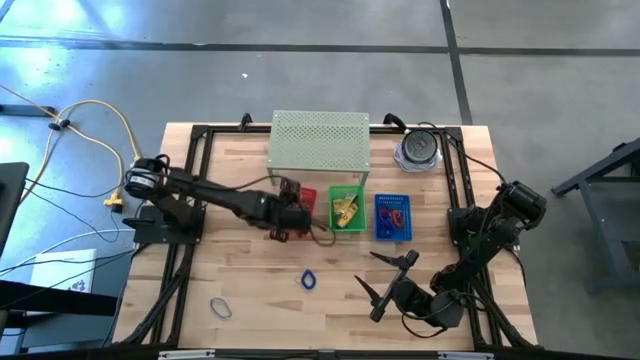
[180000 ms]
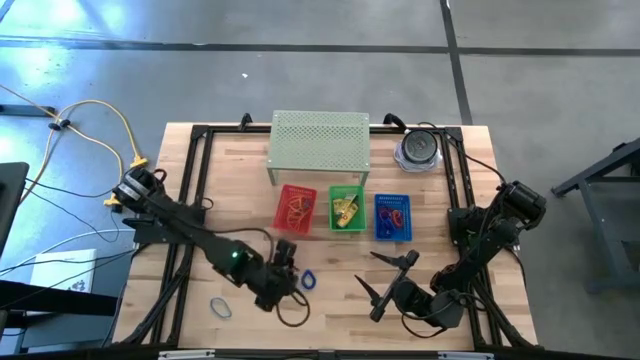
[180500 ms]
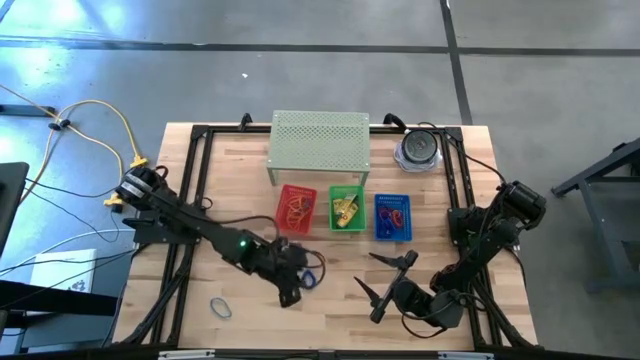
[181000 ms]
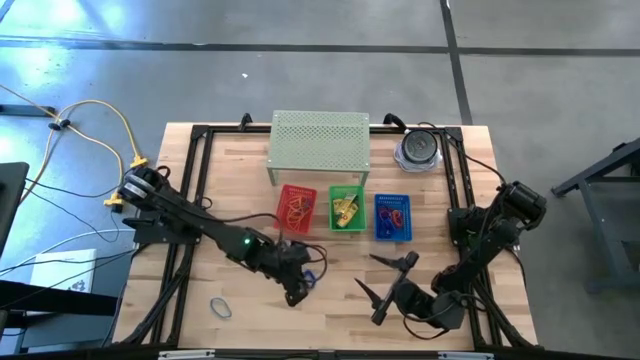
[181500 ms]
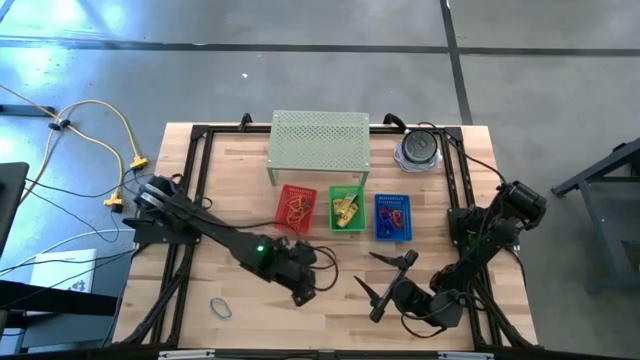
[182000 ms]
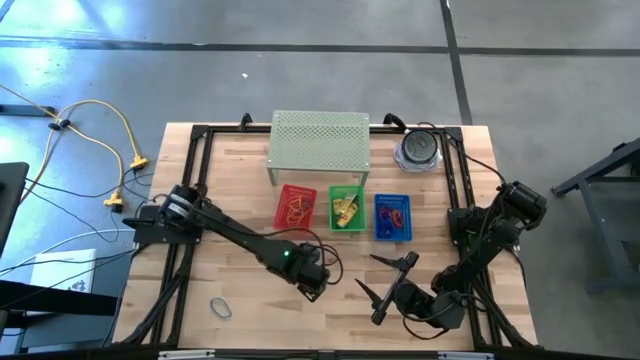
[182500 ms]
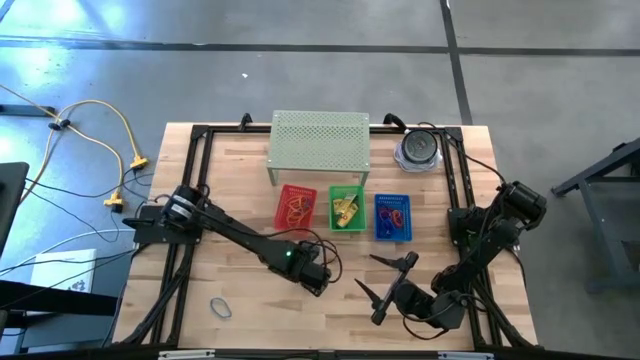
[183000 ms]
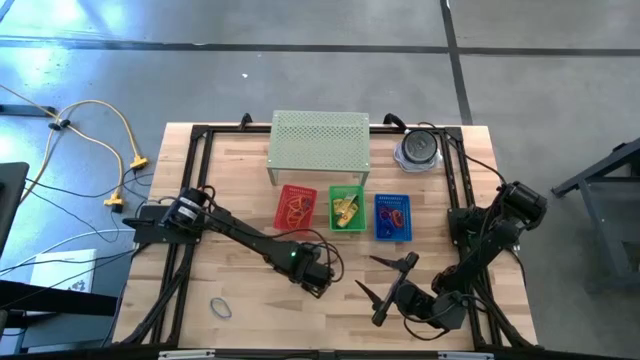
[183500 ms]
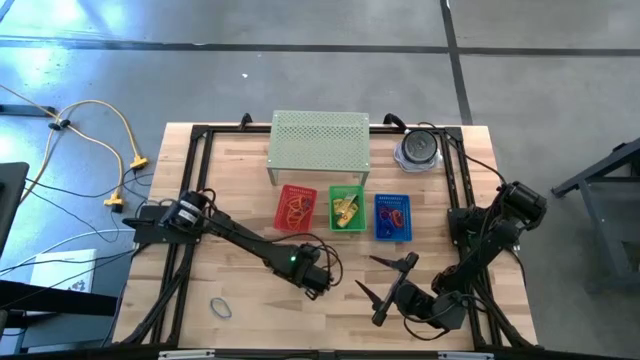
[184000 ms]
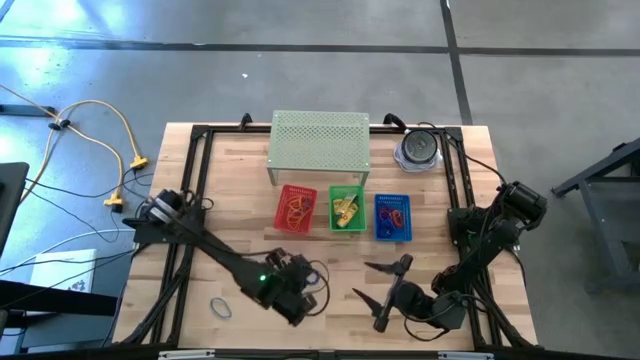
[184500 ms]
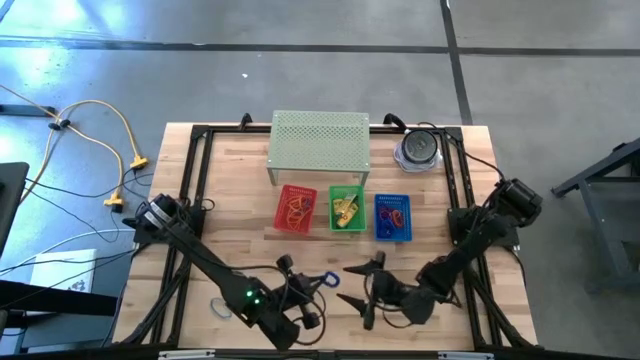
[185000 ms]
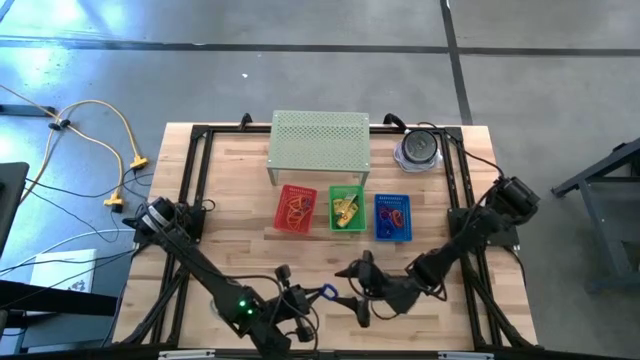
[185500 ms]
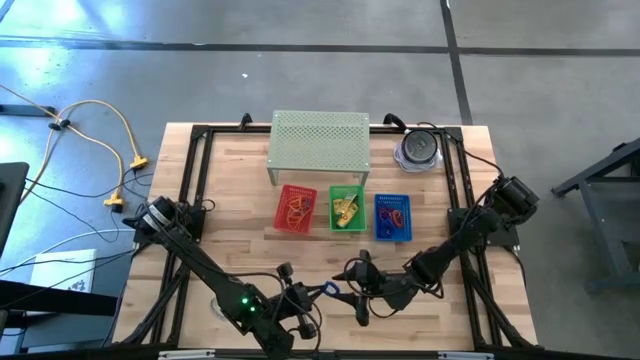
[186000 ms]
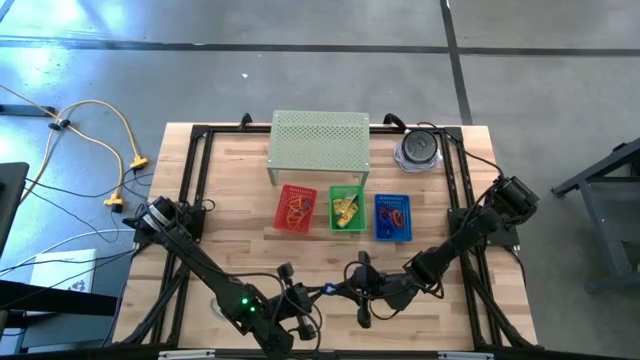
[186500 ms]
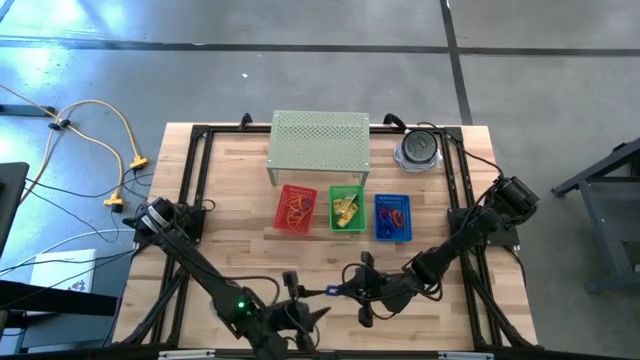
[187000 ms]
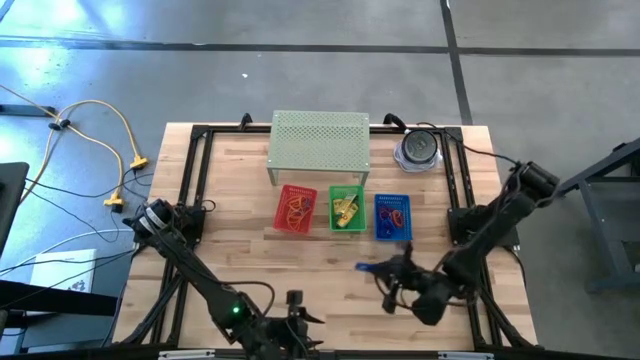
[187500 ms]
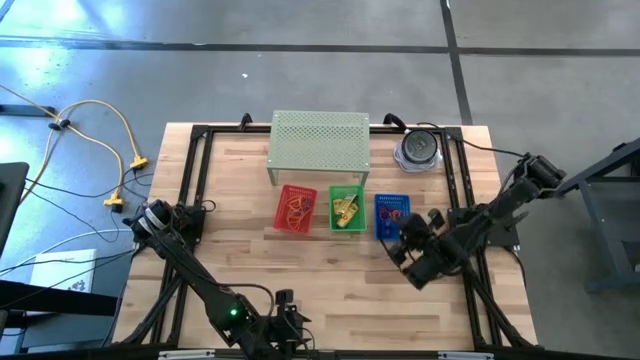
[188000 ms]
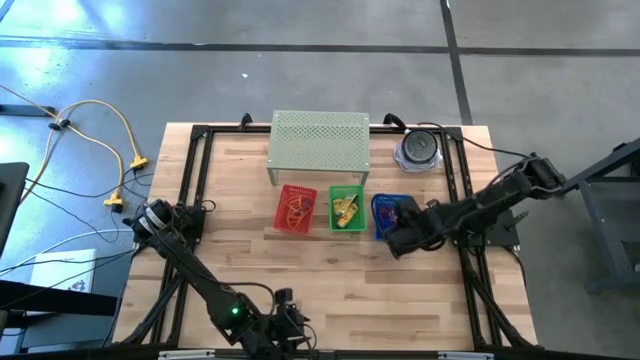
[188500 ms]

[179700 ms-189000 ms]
Task: Pick & Place Office Desk Supplies
Put the blue spring keychain into the blue bin

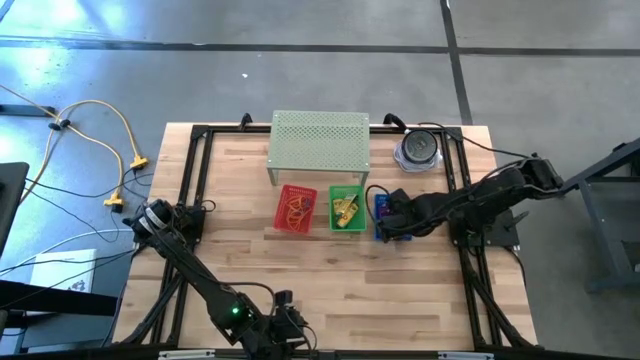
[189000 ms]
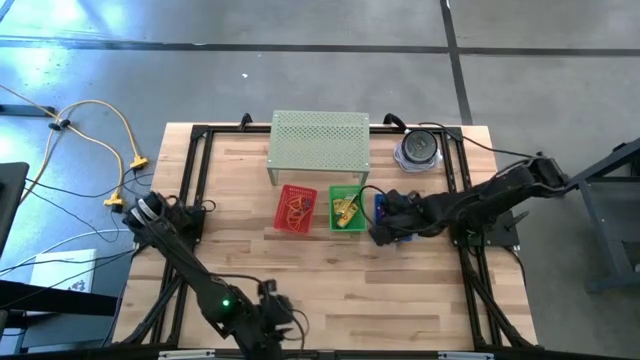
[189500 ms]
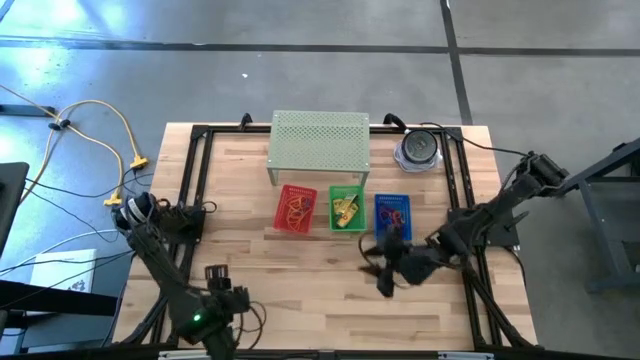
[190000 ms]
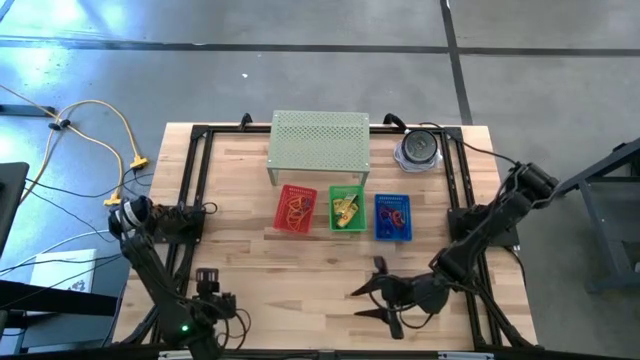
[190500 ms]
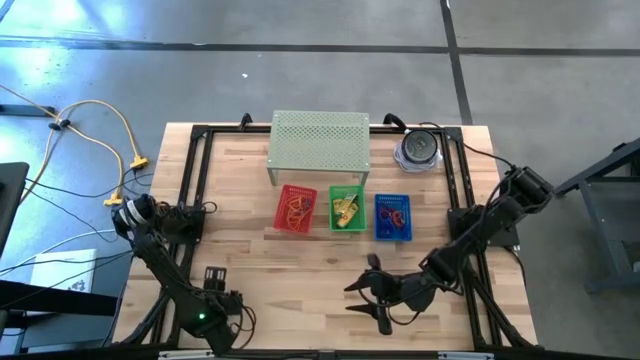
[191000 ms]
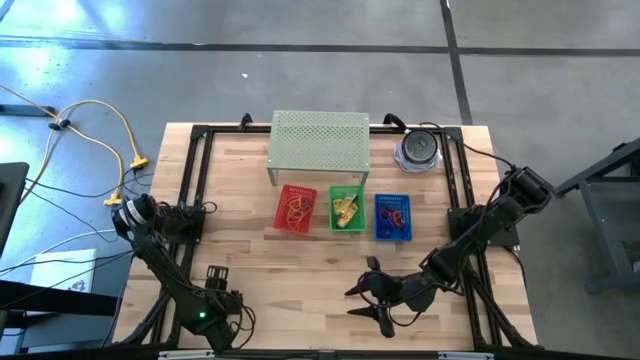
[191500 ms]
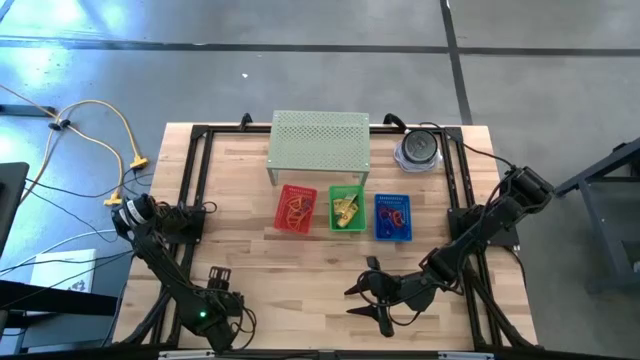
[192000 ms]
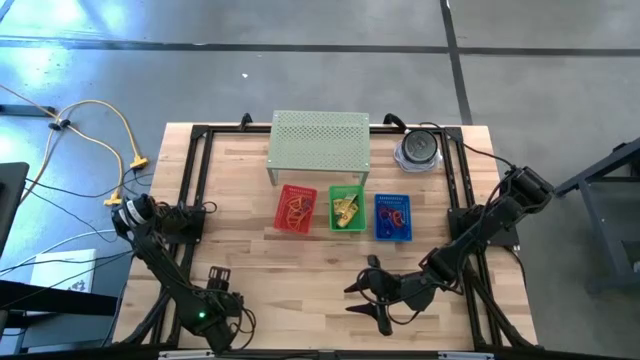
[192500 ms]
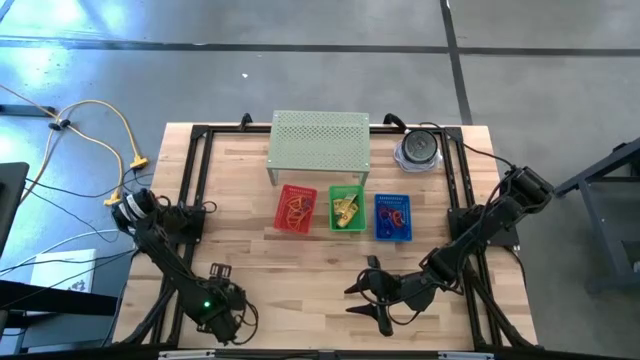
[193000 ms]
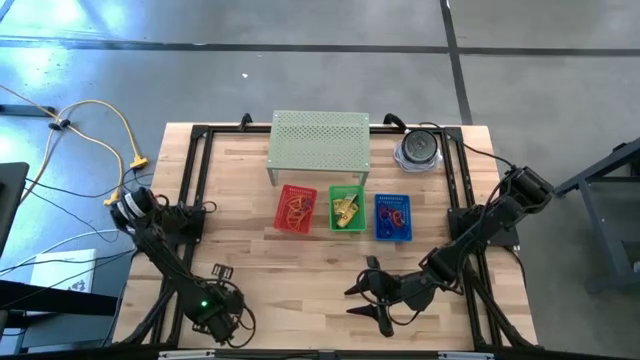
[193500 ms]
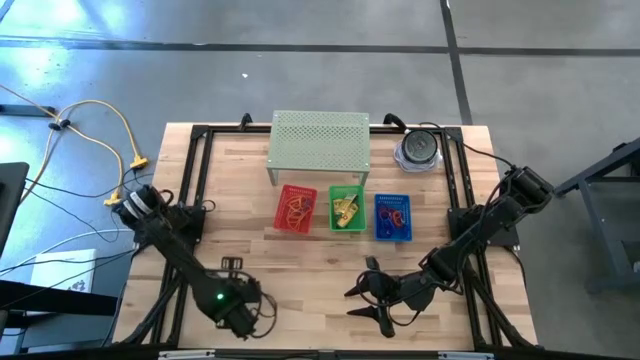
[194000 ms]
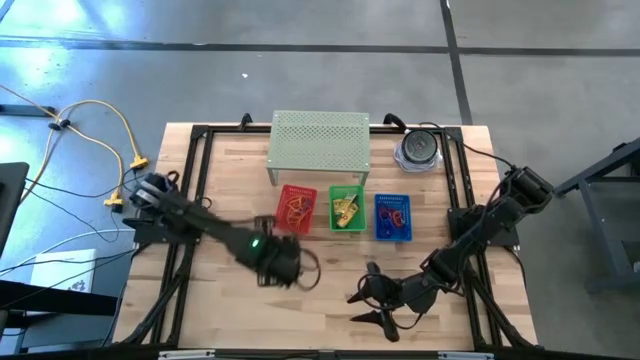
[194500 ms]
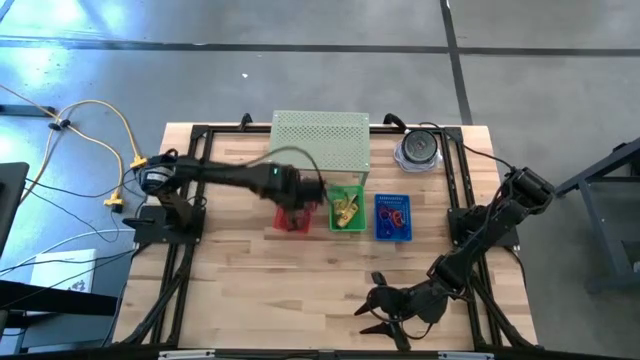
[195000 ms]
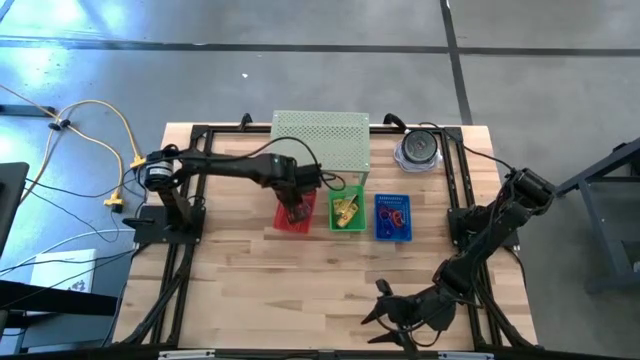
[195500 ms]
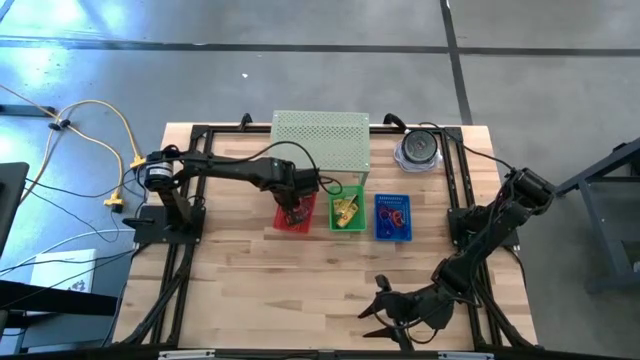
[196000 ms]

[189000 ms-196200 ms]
Put the blue rubber band into the red bin

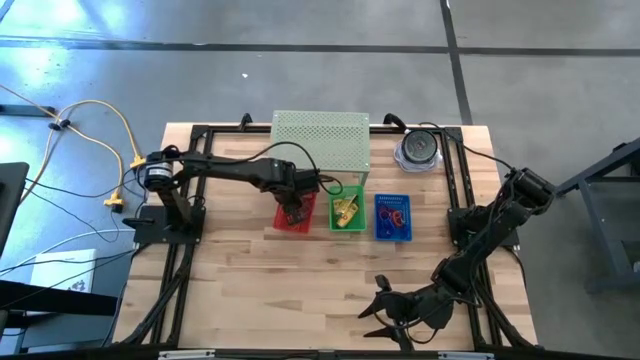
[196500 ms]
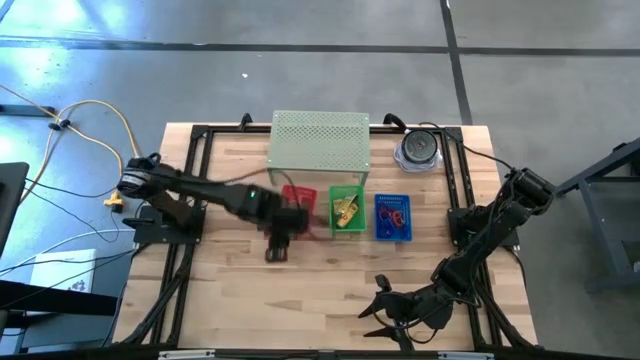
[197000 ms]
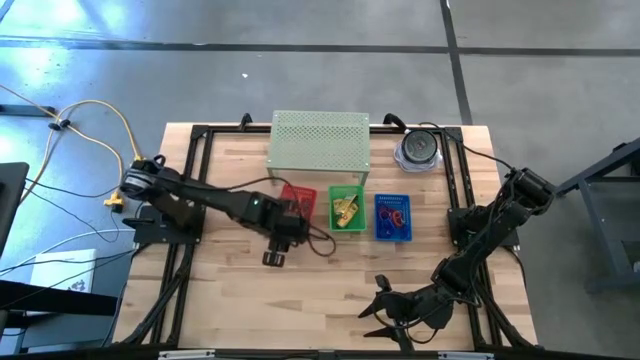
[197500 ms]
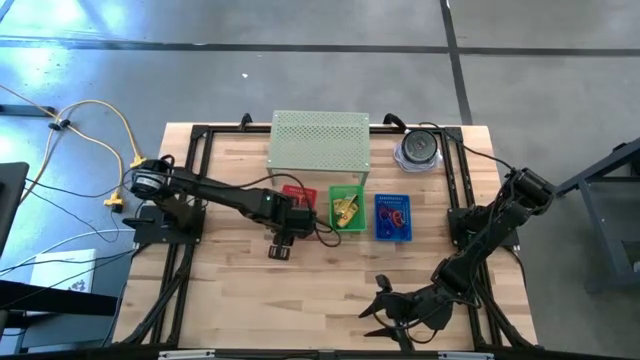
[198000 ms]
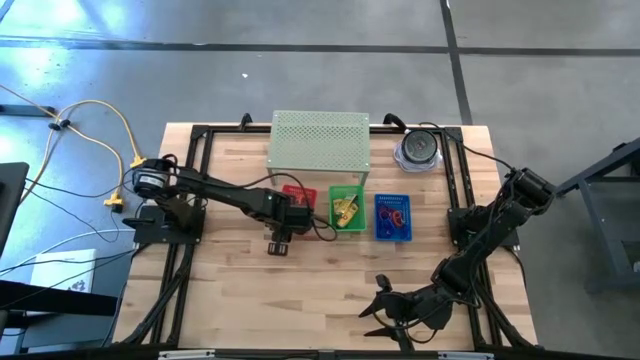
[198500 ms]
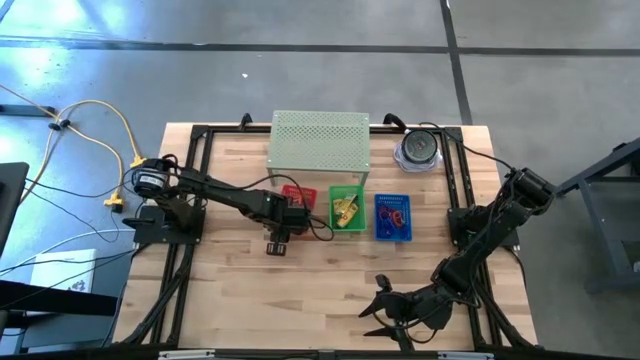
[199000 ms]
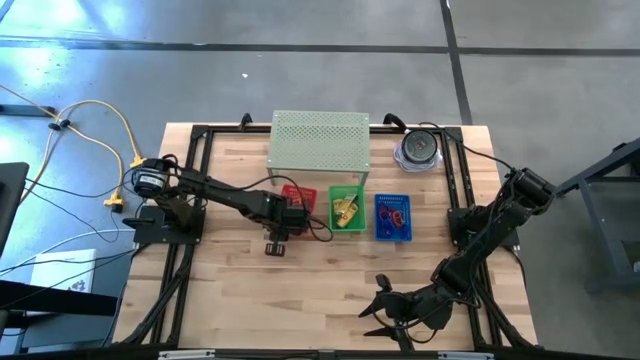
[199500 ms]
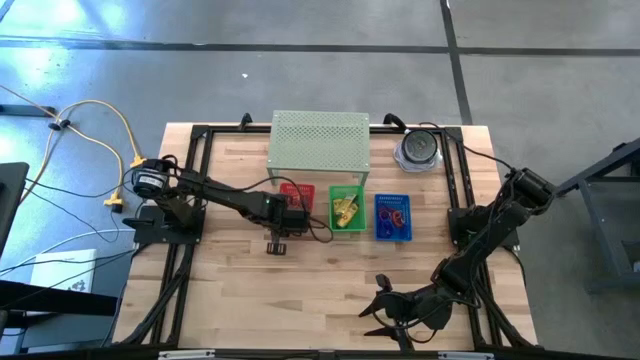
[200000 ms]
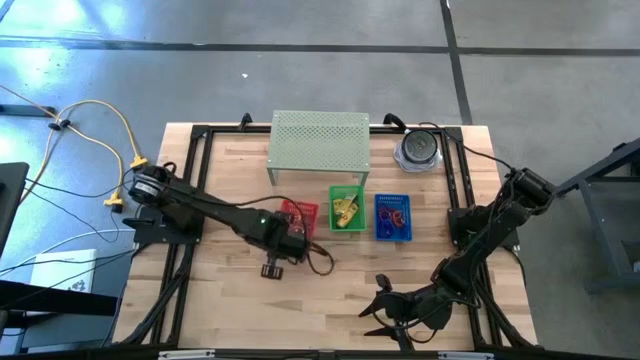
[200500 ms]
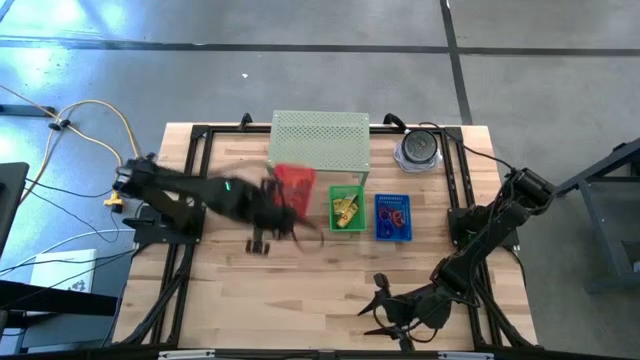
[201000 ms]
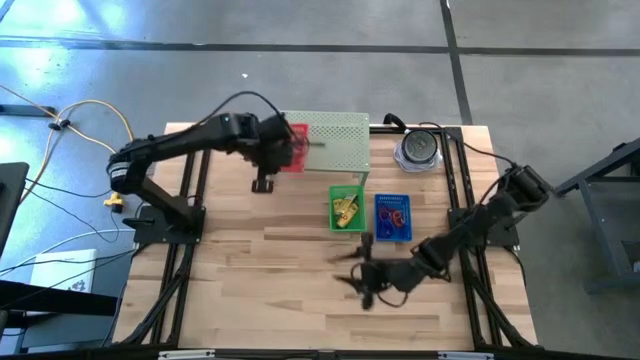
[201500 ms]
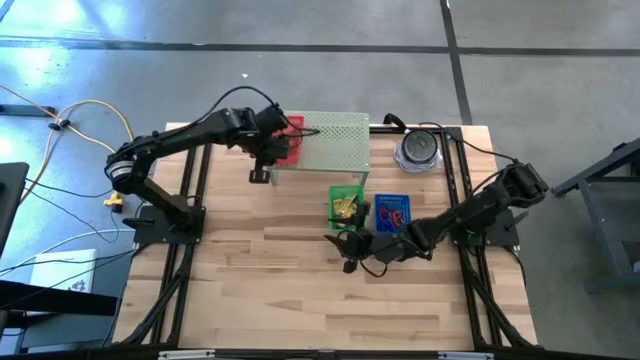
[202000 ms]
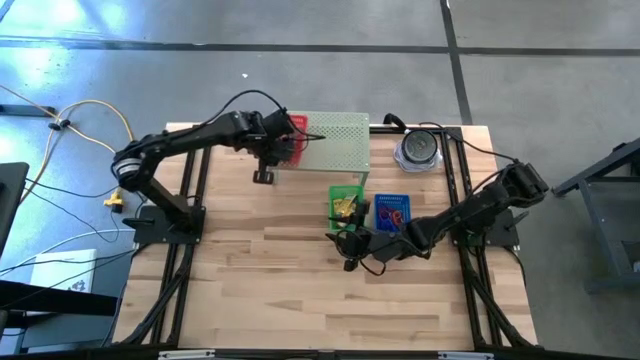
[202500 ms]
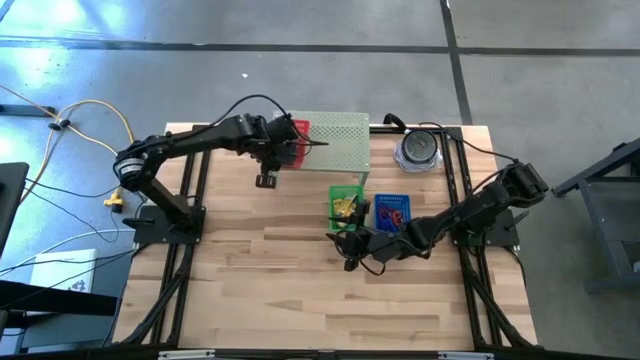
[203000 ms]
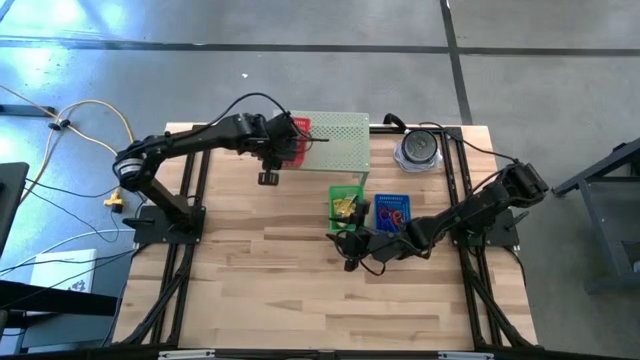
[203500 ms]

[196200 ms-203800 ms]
Put the red bin on the shelf
